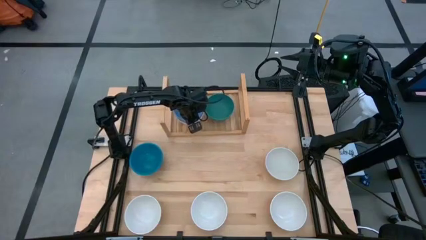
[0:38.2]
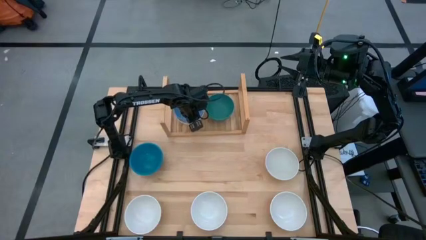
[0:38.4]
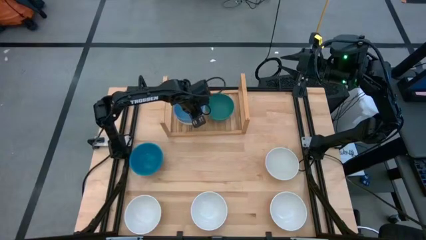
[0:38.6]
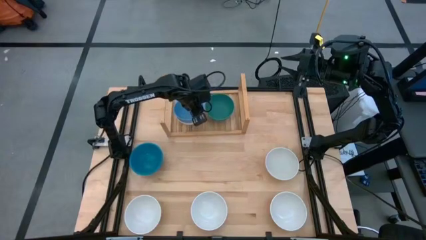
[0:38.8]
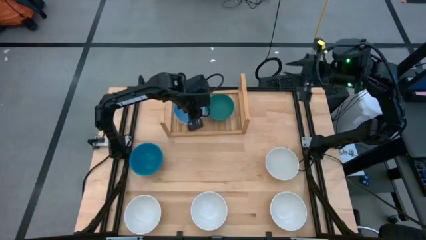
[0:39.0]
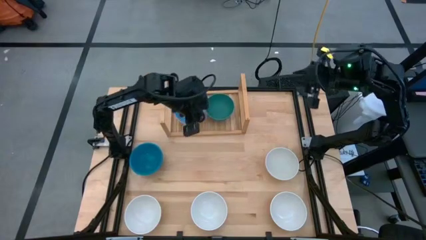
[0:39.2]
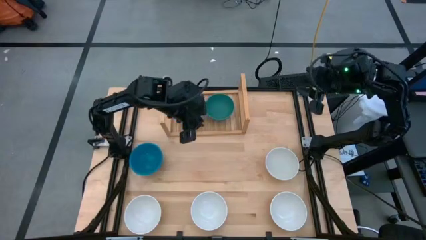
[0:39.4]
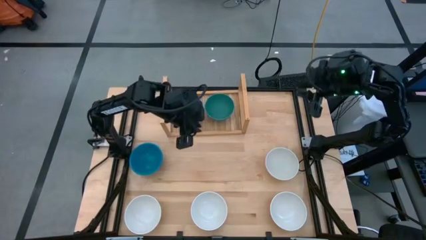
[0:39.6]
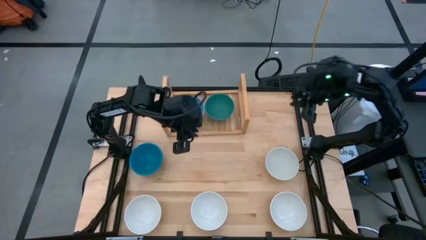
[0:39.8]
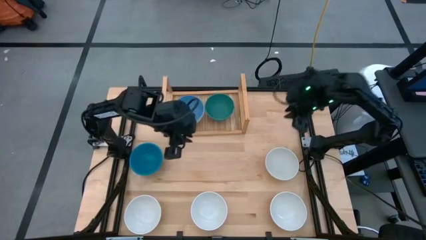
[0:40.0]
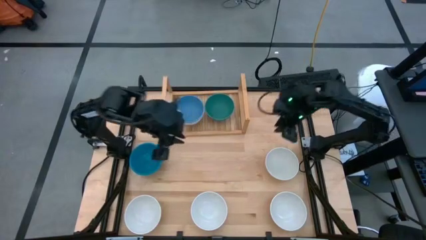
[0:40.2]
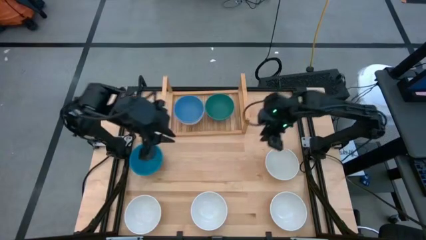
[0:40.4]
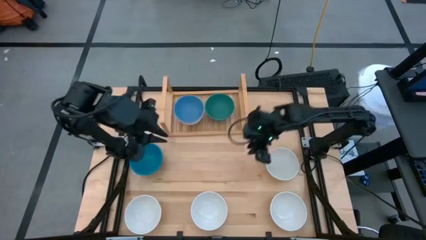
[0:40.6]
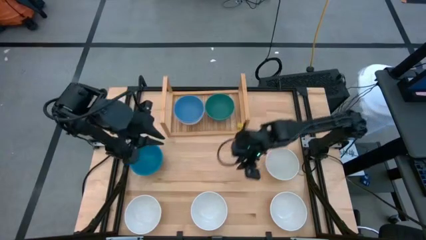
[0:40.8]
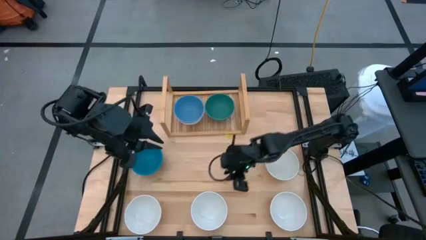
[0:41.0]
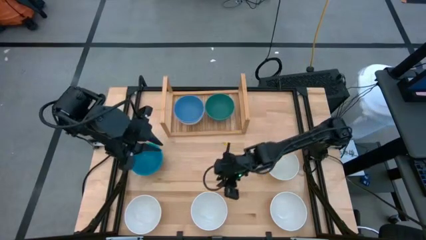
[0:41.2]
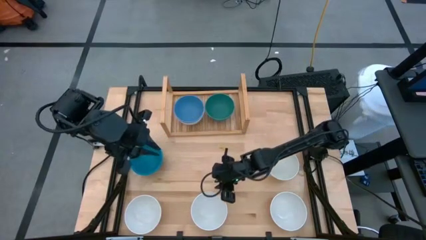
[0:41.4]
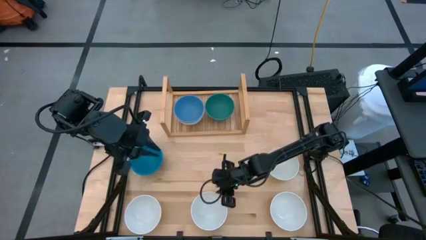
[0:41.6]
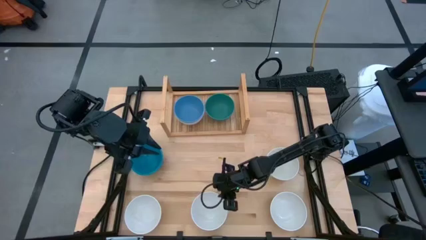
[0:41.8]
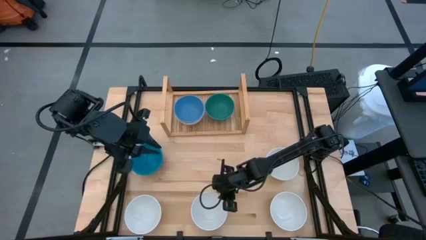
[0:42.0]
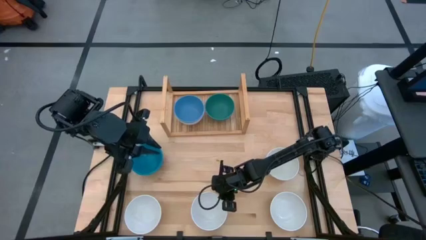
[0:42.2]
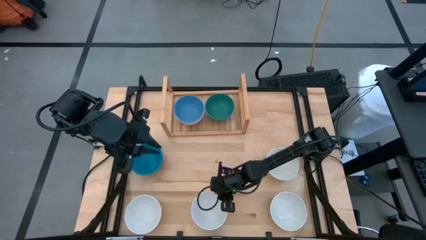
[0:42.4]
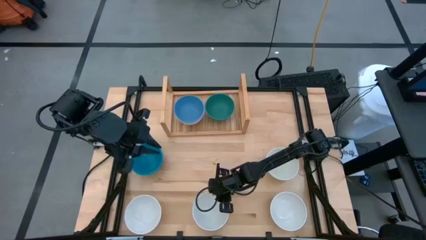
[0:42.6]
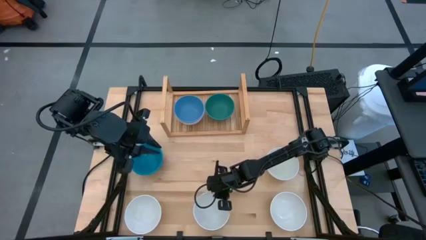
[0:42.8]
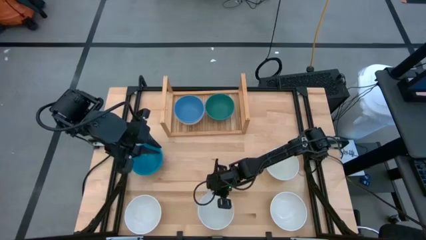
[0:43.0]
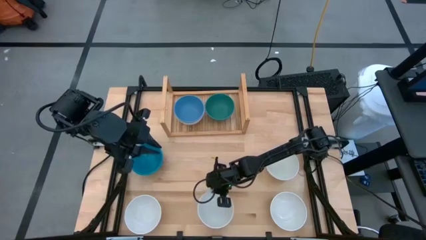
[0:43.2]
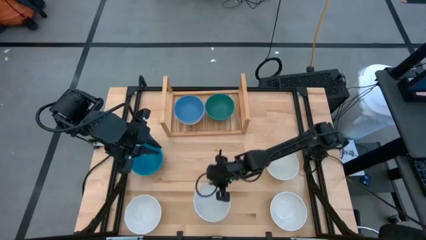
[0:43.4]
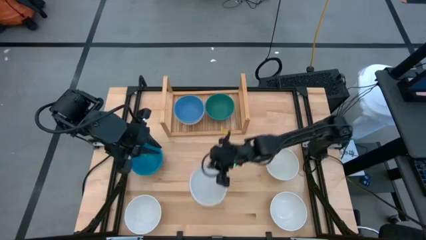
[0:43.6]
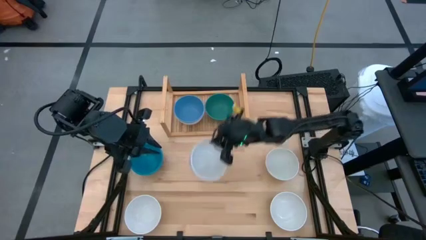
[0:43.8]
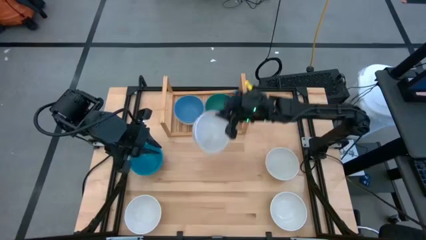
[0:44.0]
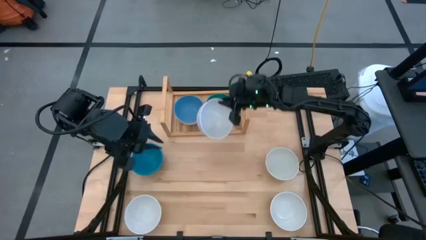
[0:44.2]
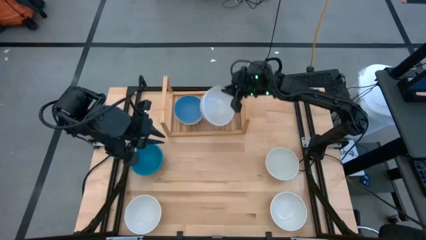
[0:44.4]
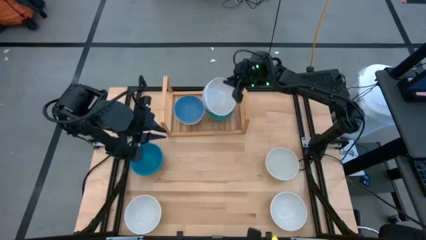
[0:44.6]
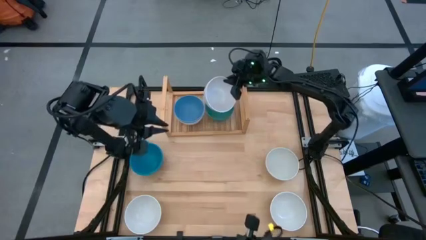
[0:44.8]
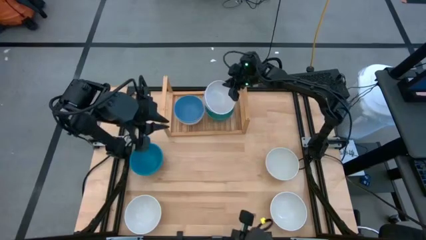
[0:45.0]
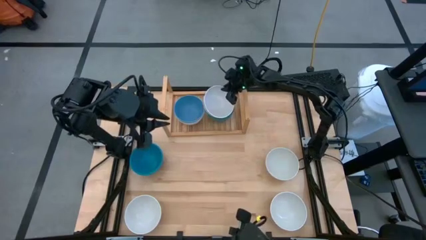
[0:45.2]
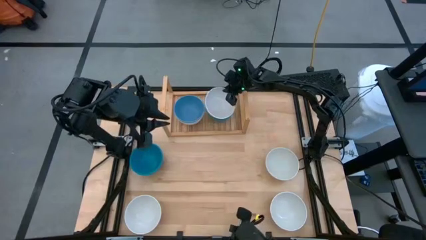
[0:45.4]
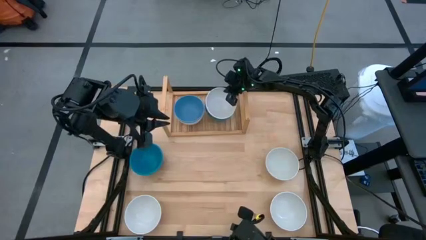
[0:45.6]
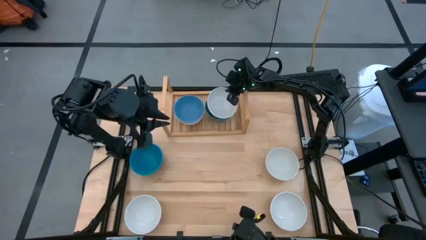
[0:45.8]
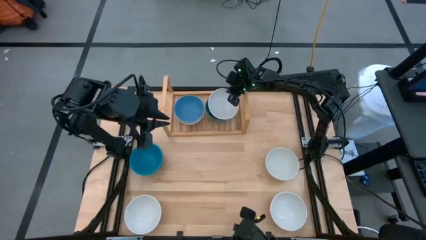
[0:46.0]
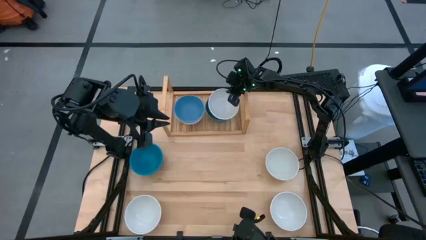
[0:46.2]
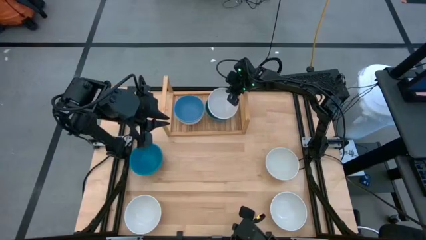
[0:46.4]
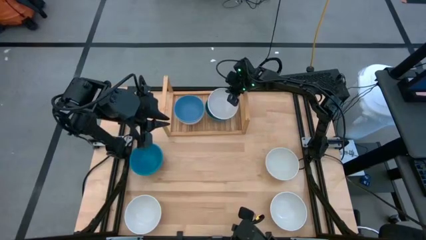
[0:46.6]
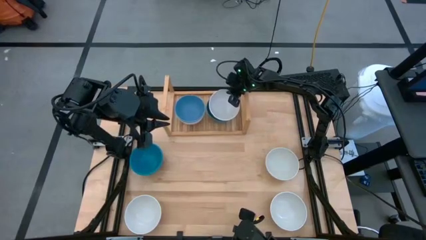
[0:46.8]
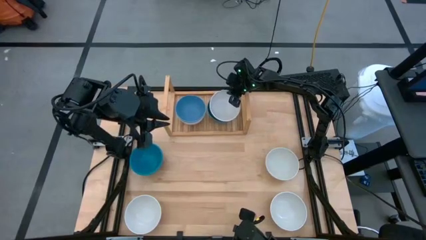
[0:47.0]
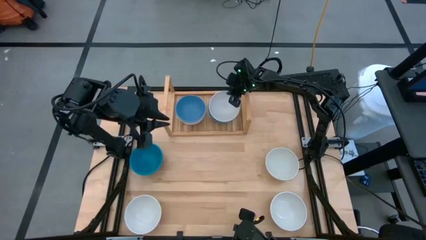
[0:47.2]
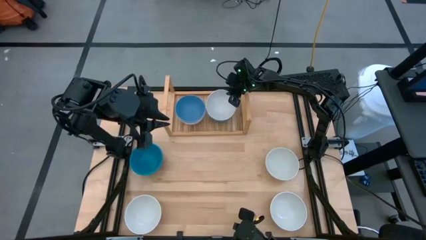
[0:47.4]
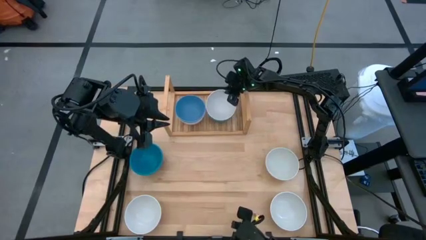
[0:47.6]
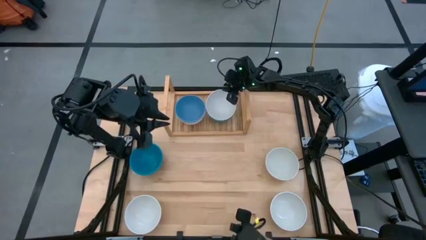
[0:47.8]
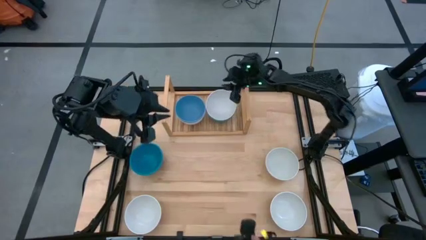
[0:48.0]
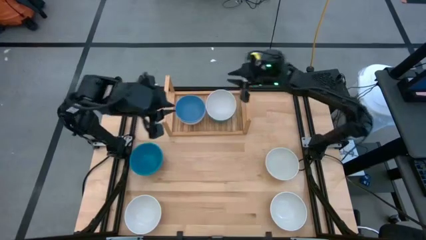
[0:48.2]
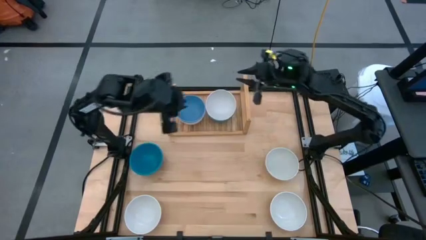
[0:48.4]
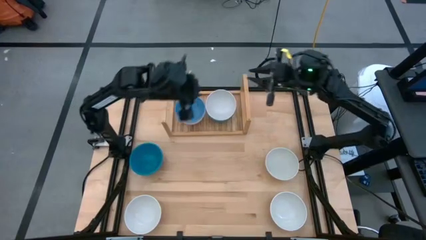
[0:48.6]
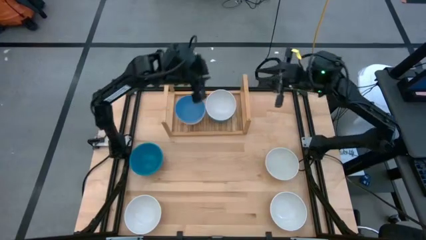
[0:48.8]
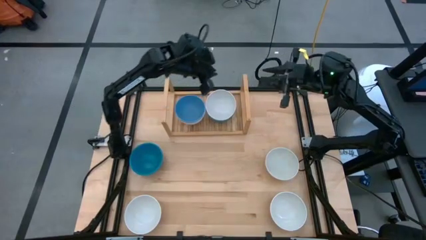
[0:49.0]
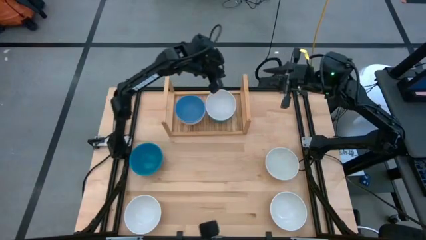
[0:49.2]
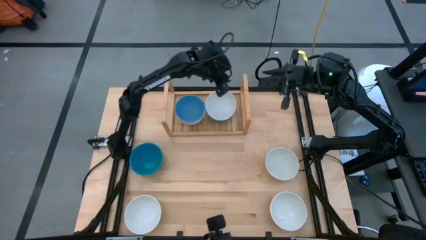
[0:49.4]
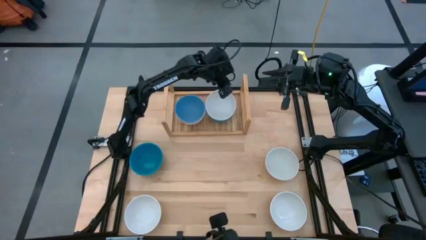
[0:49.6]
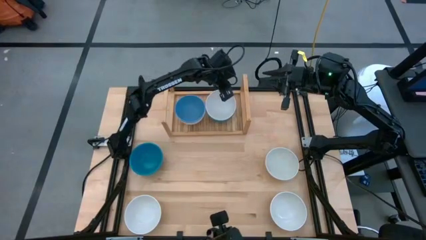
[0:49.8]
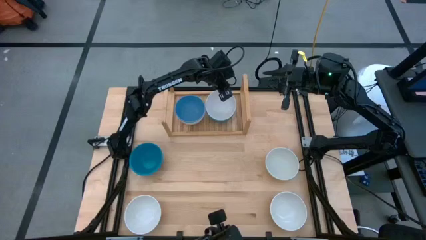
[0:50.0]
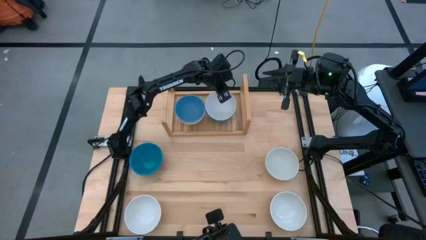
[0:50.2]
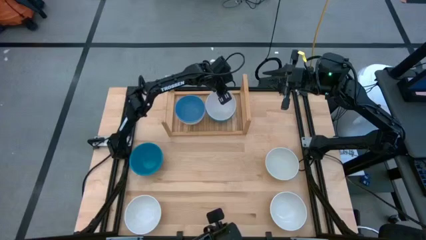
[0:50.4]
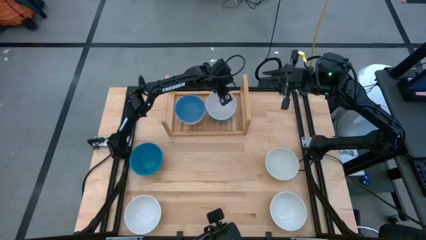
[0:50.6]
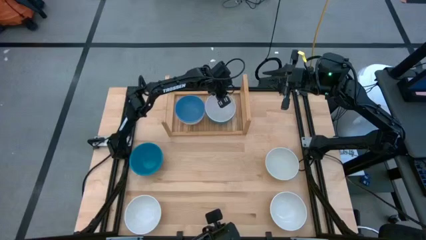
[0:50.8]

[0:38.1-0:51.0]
Task: Place and stack bowls onto a shelf
Stack the white bowl on the green bowl on the shelf

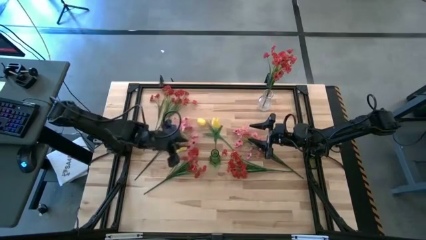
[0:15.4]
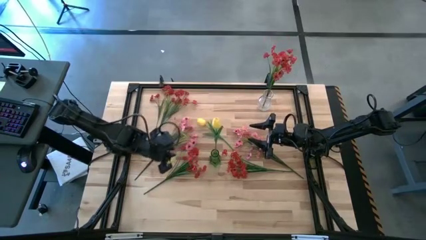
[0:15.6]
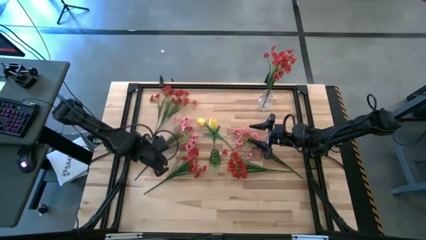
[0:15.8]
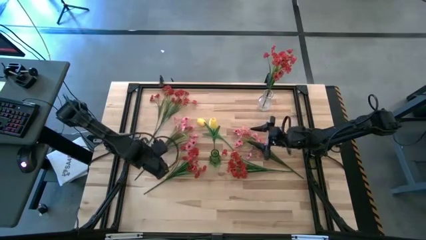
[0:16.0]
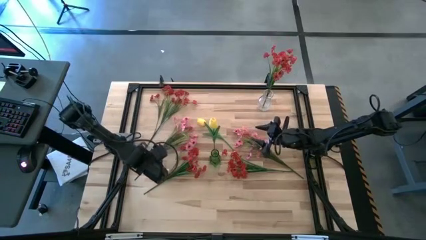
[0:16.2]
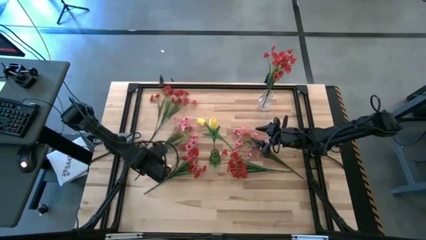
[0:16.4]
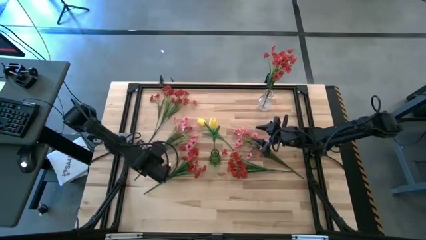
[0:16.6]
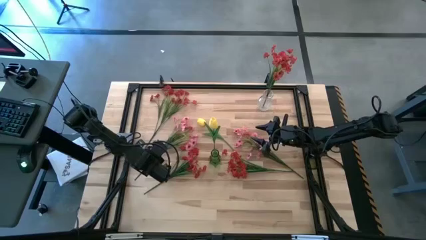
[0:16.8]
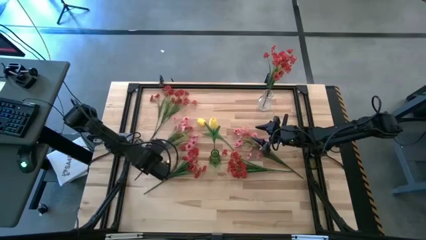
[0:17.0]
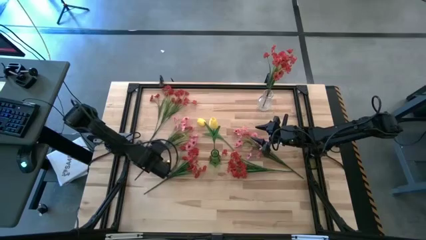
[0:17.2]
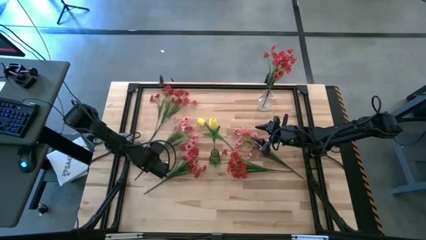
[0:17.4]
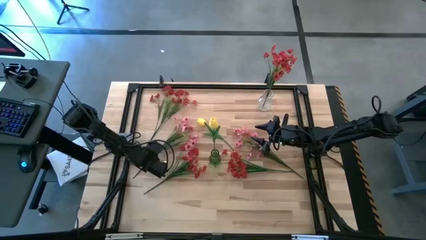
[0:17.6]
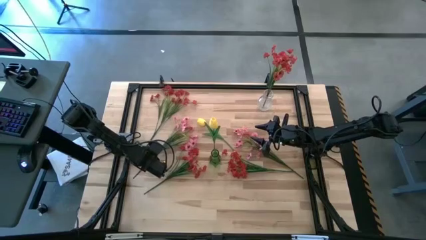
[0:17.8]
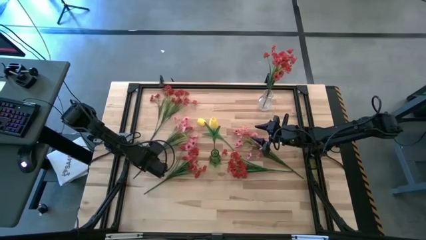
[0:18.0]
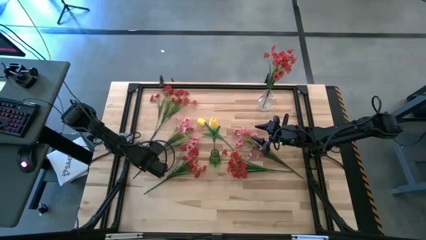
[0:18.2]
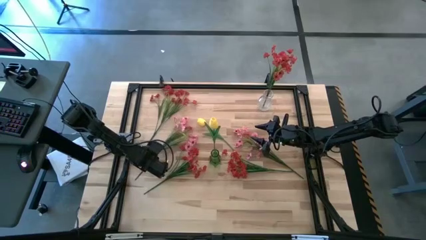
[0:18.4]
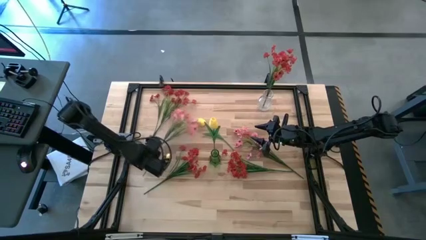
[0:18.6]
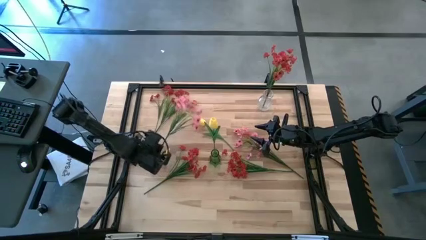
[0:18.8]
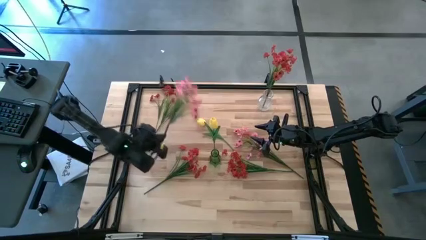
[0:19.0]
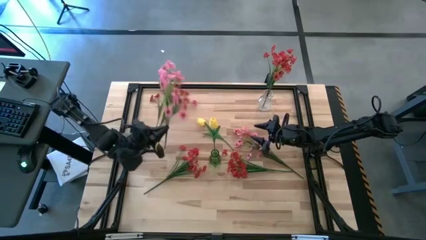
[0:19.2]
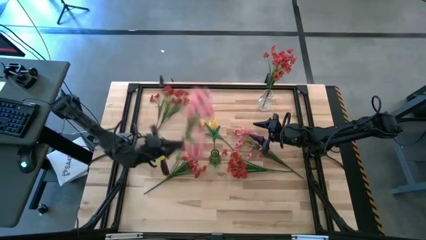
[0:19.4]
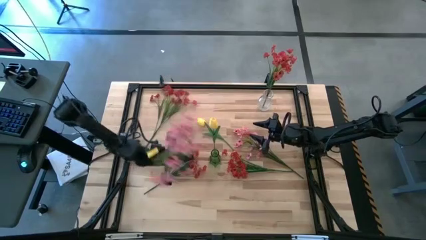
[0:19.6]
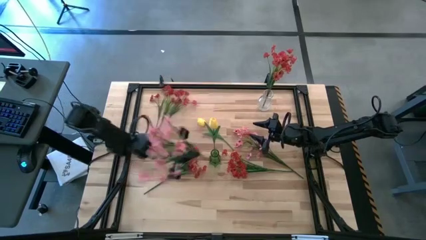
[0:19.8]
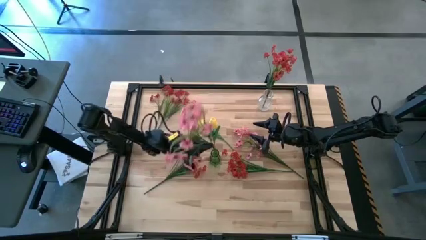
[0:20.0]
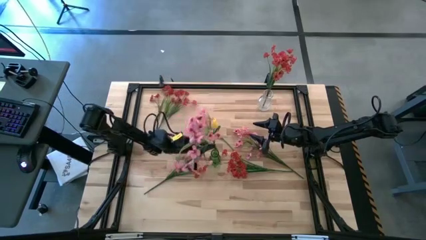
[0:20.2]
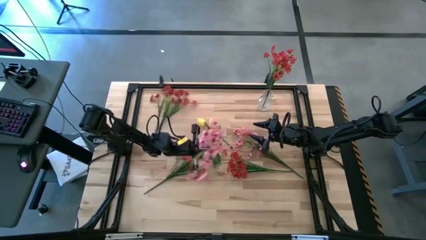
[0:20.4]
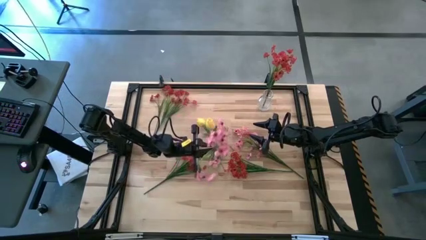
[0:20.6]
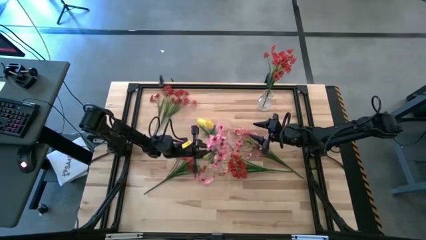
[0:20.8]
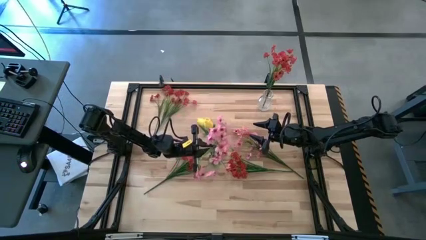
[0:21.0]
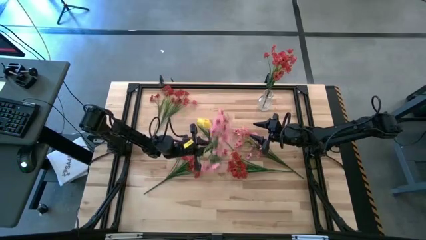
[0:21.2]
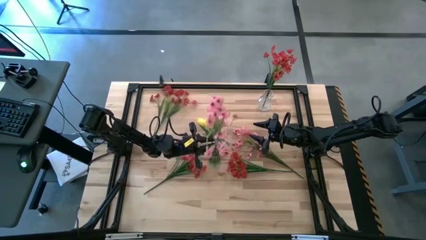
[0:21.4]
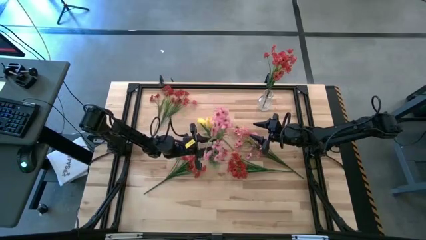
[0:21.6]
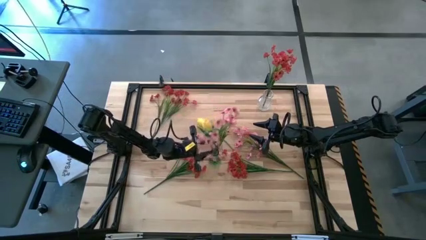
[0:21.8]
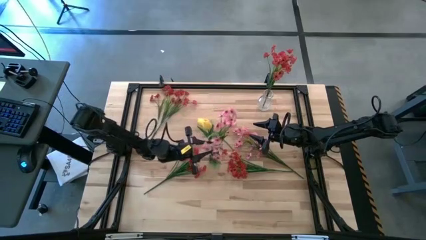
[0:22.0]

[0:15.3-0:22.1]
Task: Sort flowers into vase by color
Put the left pink flowers into the green vase
